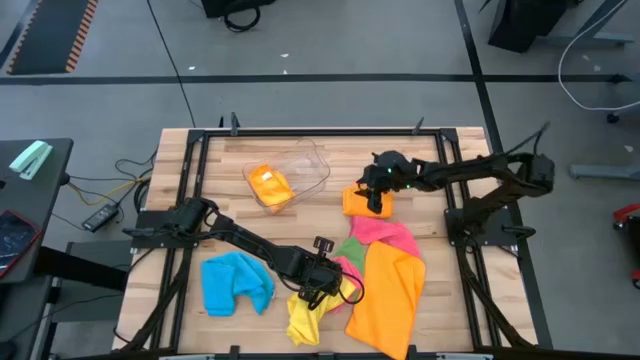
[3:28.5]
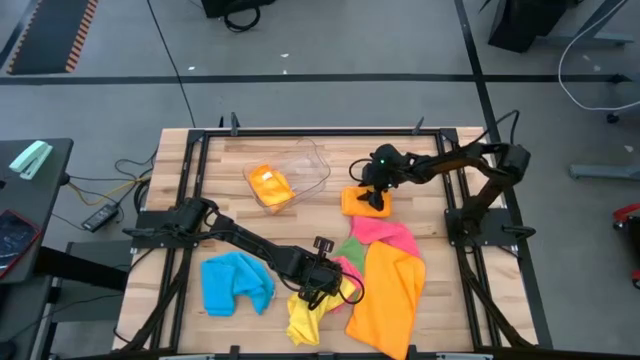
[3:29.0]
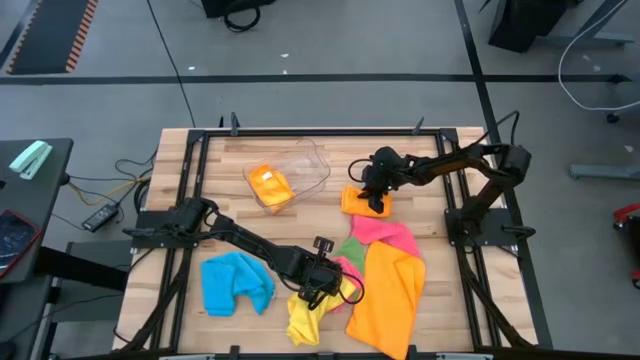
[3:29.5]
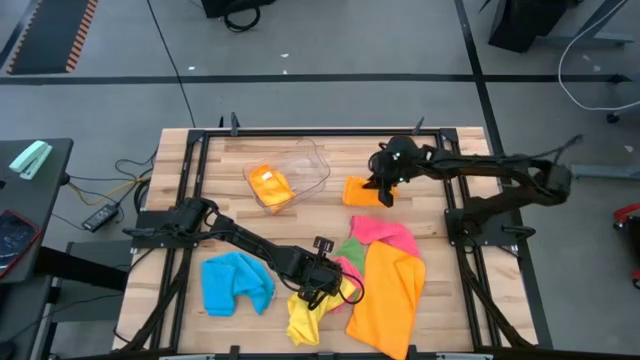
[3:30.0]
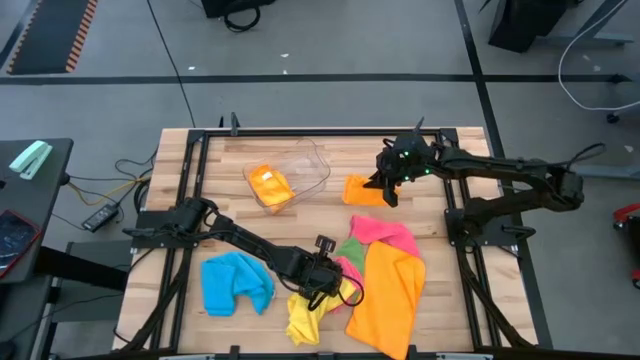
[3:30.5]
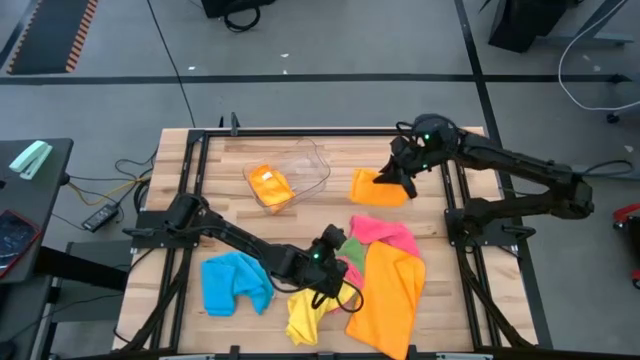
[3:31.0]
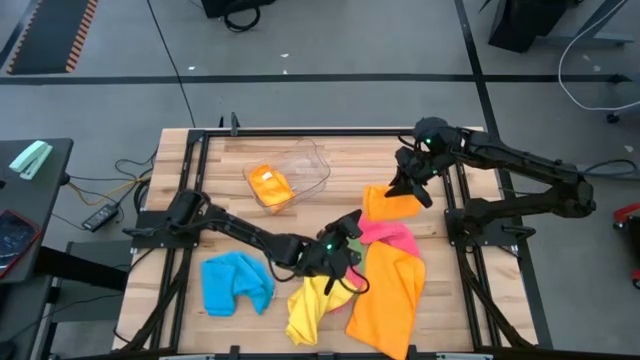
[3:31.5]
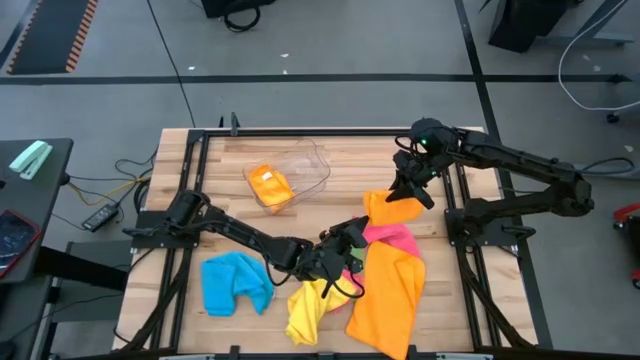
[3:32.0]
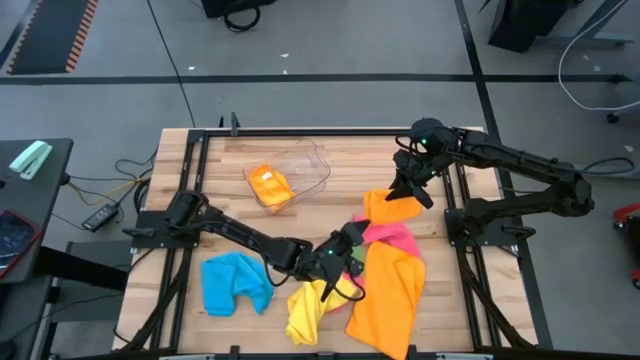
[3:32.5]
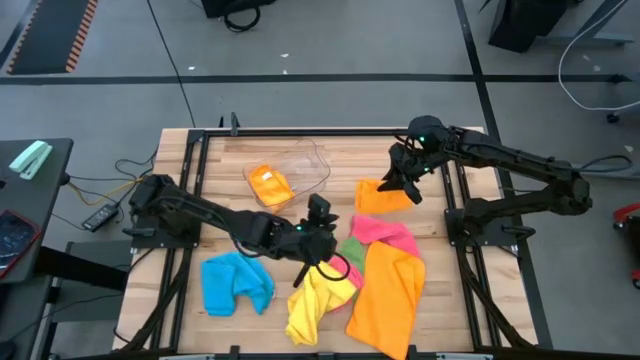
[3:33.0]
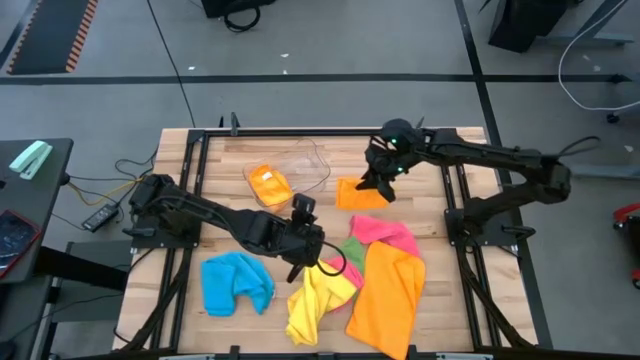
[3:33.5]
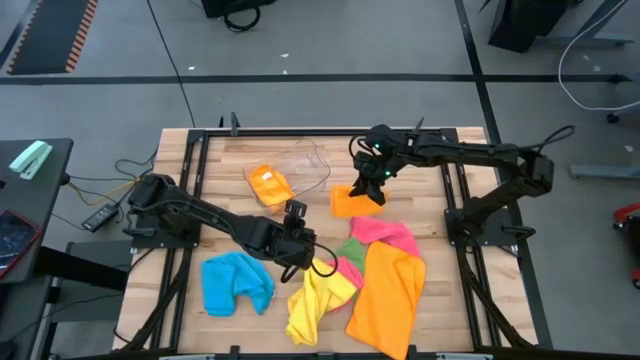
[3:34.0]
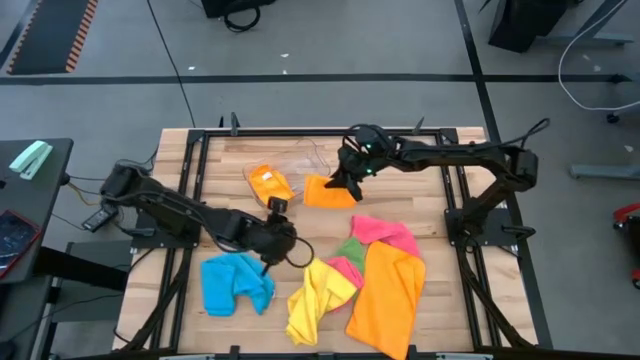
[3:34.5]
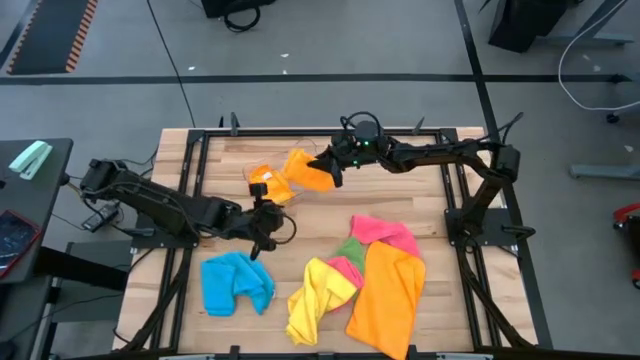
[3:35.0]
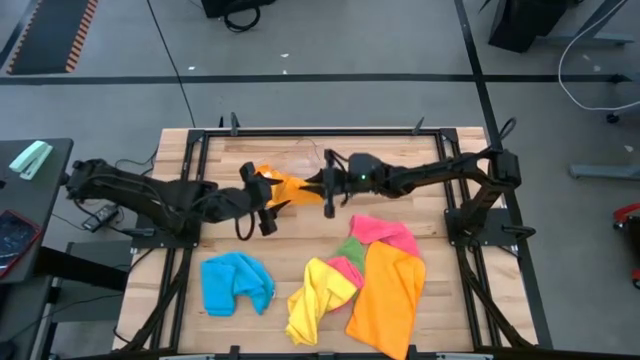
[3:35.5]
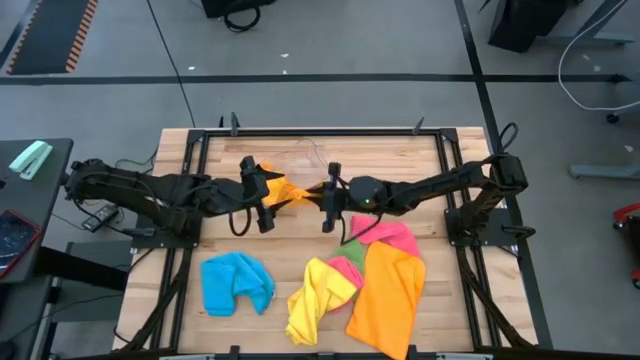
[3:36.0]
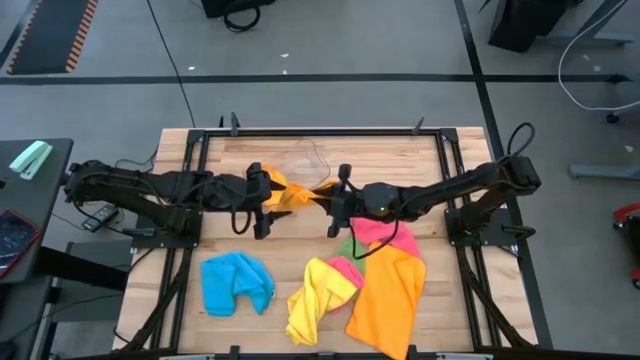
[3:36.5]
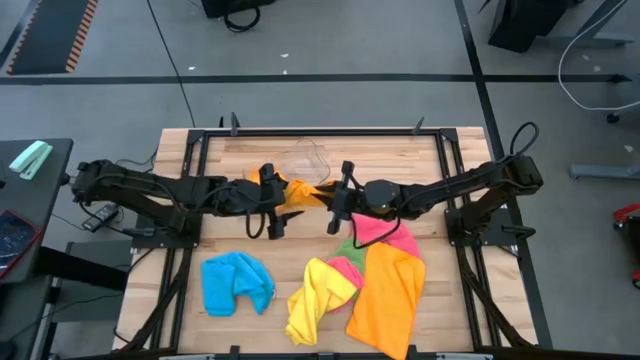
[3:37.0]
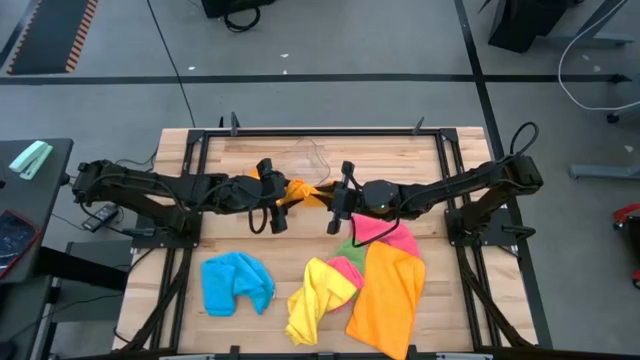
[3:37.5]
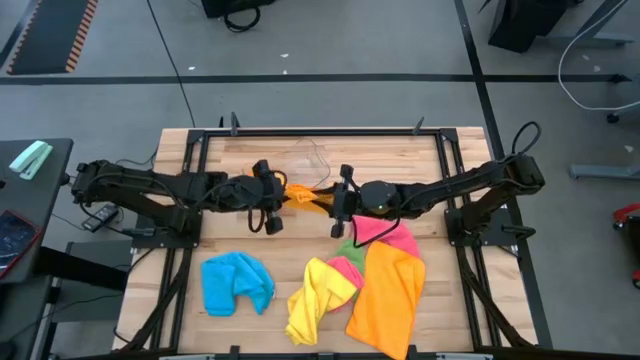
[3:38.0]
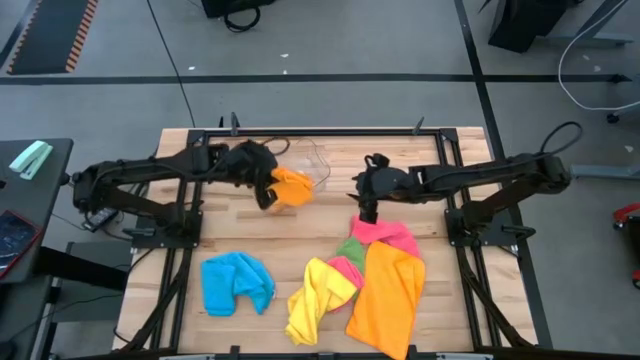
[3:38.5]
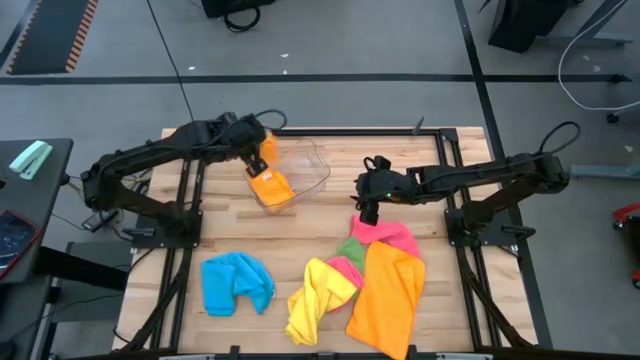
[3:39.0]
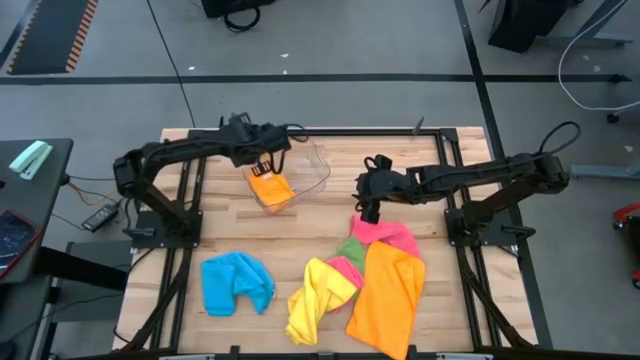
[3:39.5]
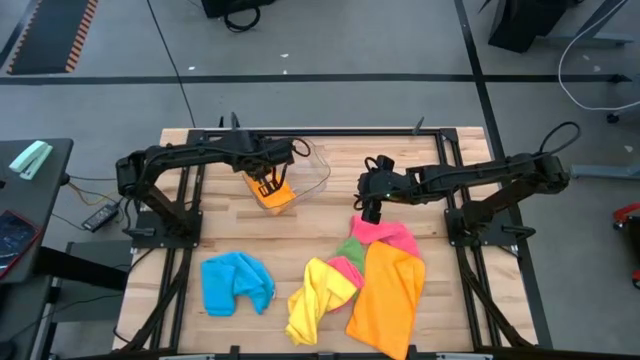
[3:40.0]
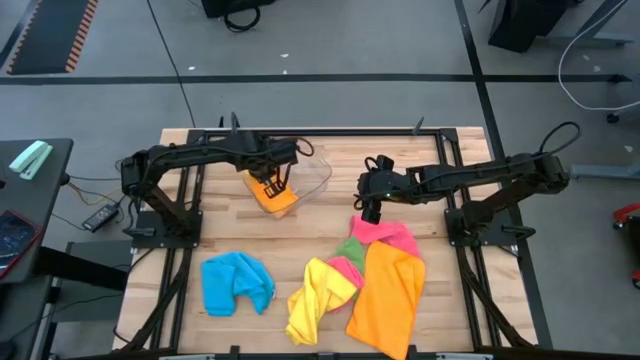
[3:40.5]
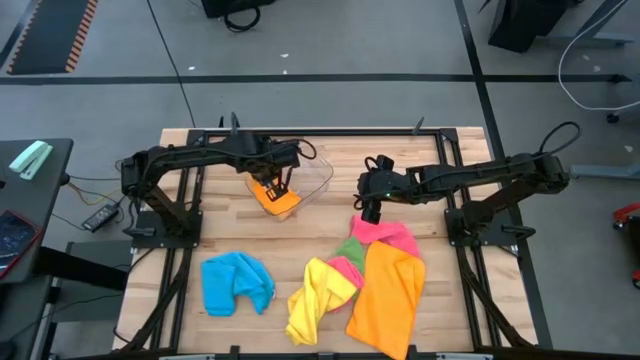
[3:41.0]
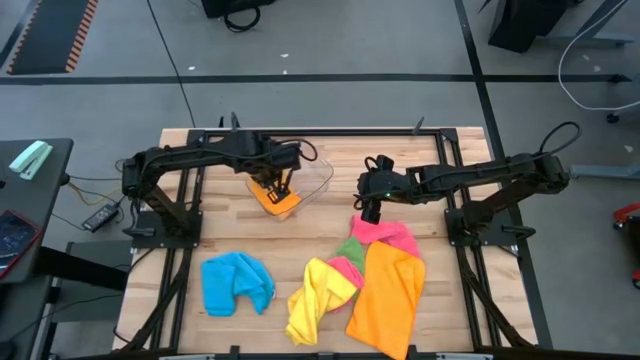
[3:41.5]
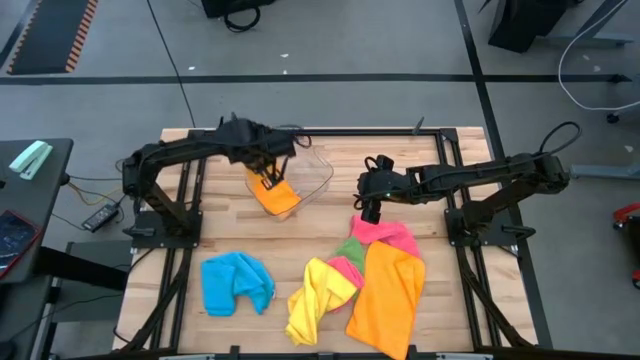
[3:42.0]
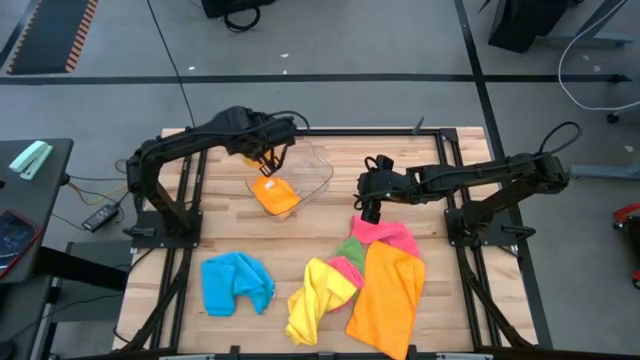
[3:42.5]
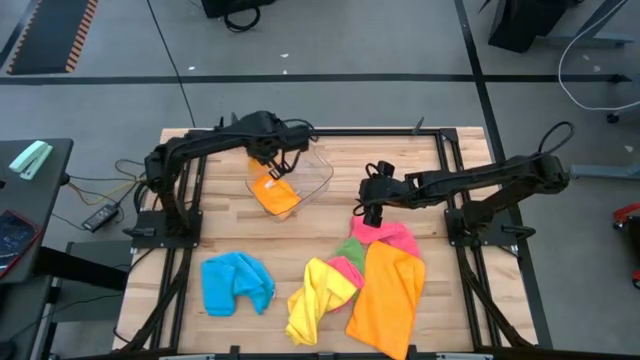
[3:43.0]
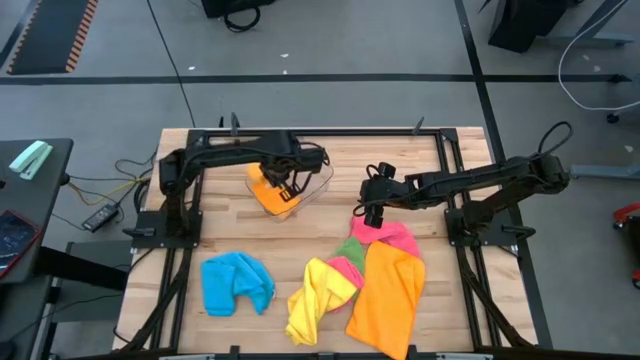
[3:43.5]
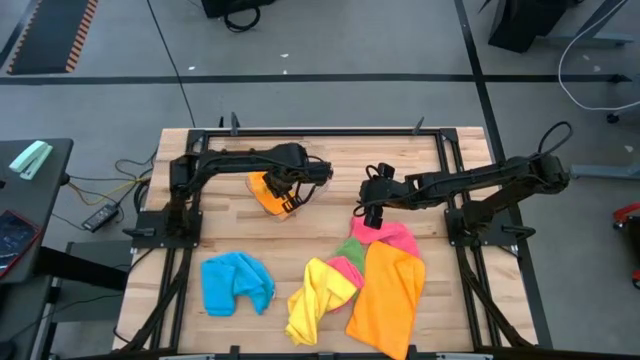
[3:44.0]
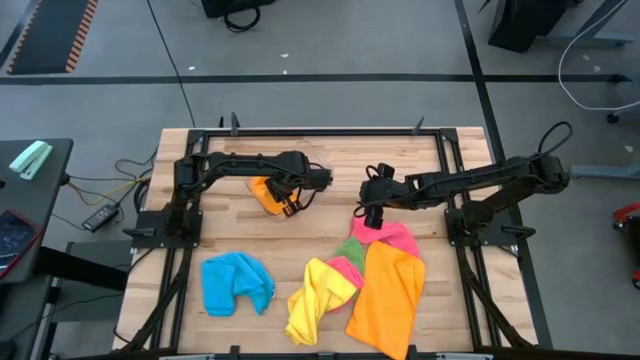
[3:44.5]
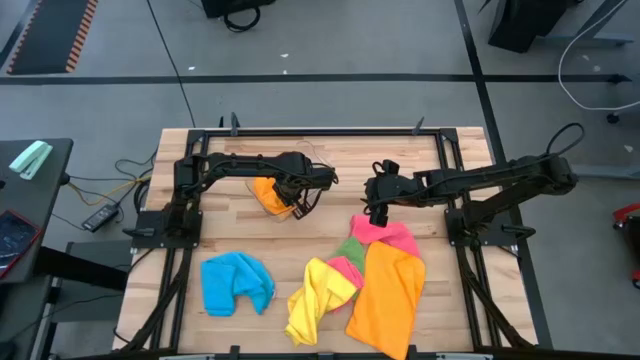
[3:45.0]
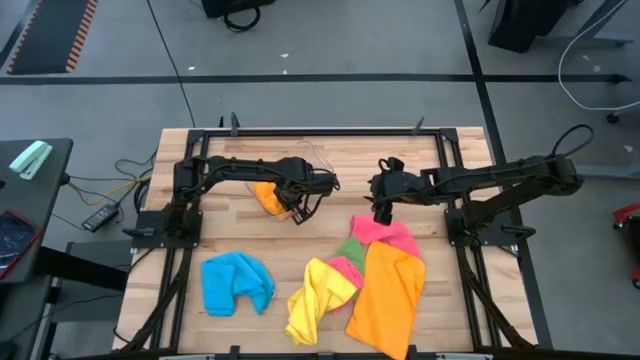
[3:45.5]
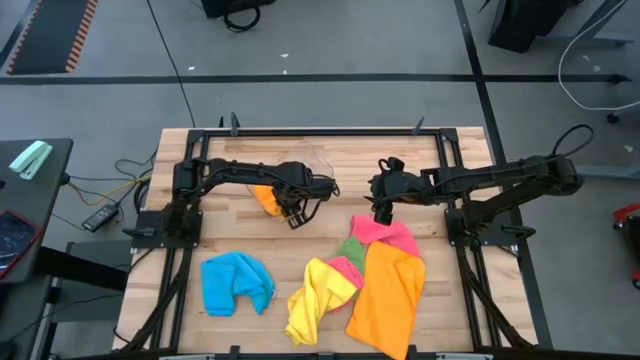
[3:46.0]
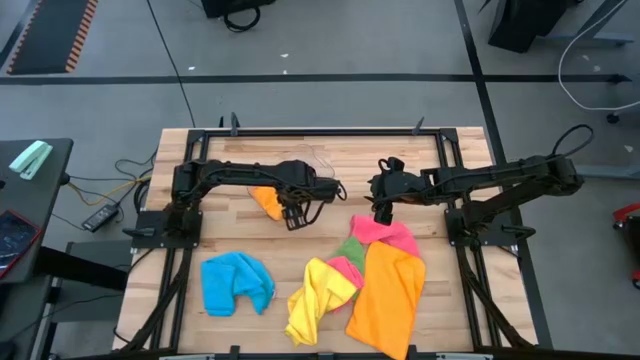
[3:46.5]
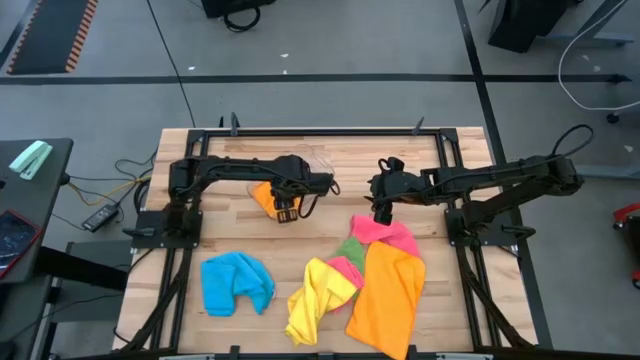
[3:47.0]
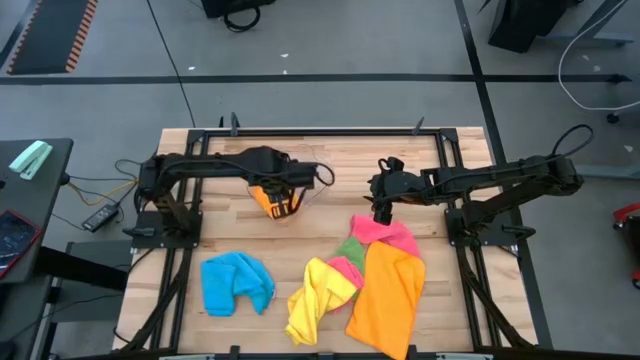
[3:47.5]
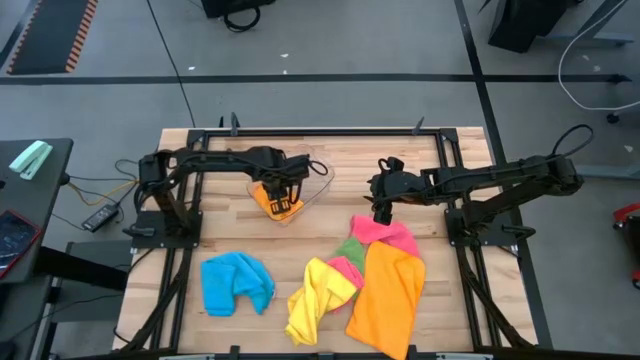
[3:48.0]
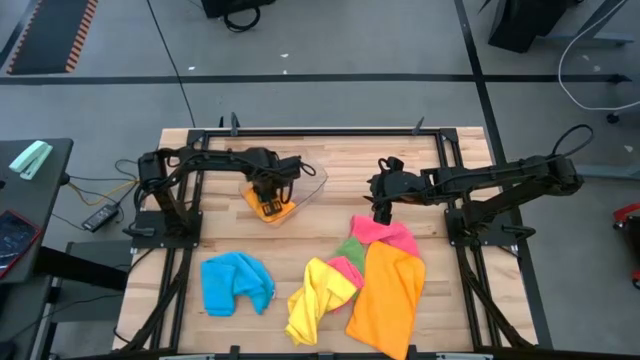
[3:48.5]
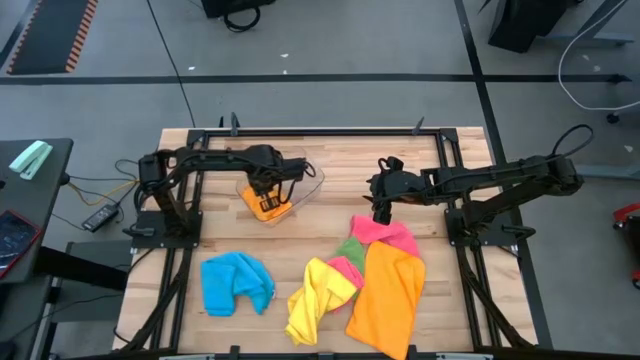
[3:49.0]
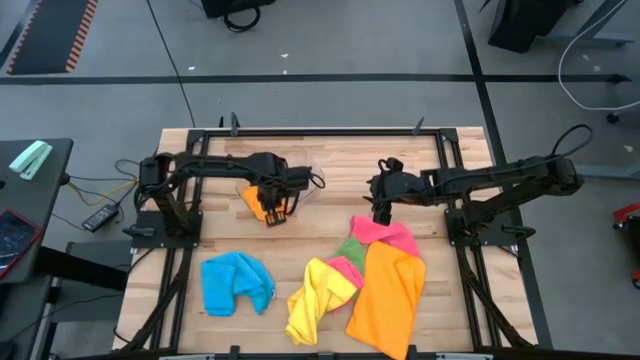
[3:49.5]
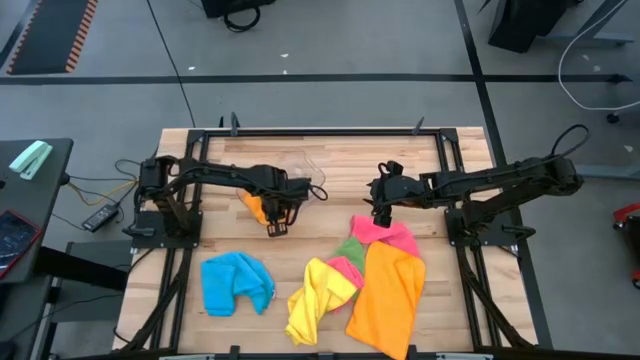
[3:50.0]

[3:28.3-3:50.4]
Task: Fold microfiber towels
Put the folded orange microfiber towel into the transparent bin
